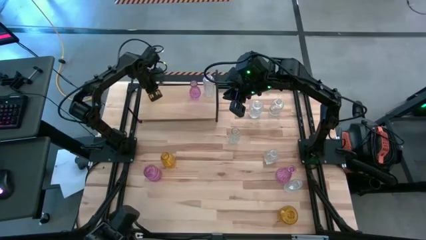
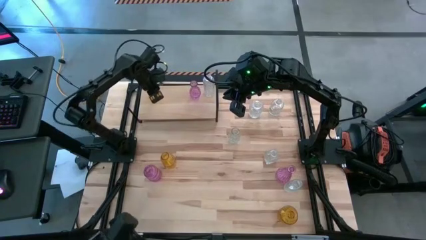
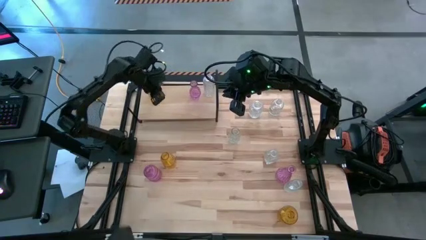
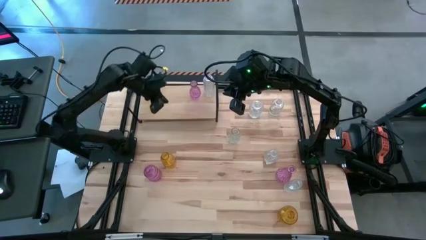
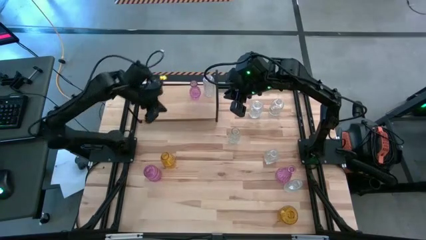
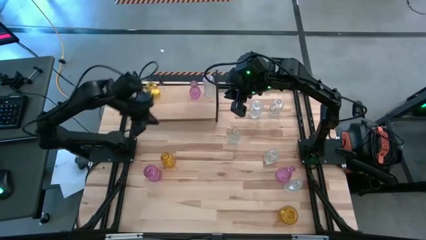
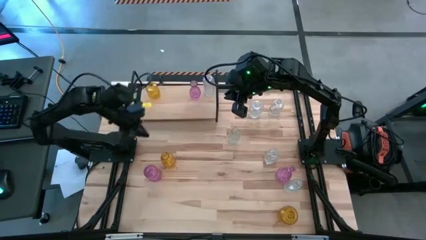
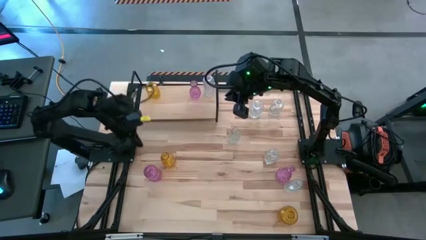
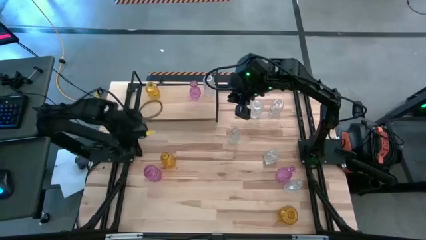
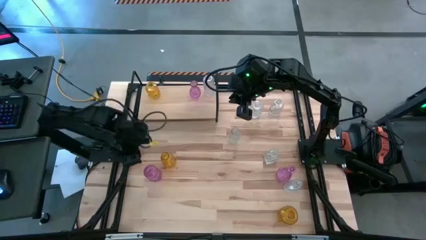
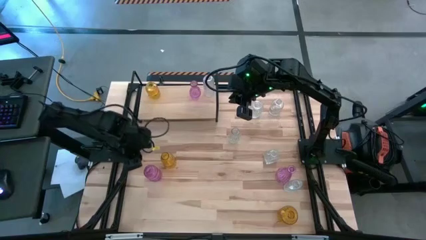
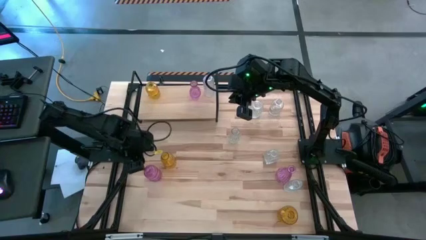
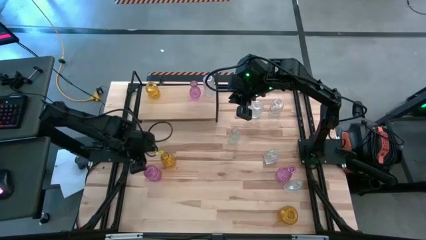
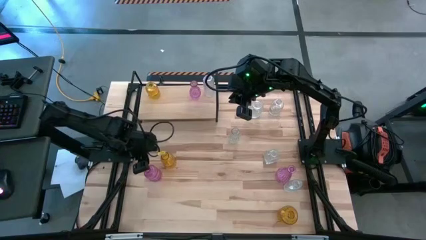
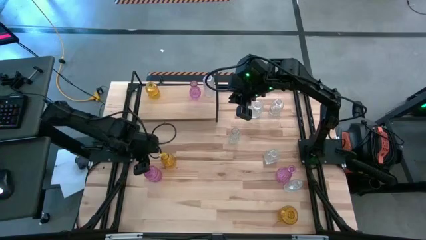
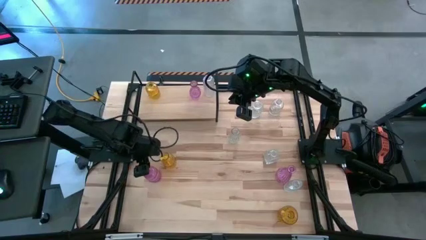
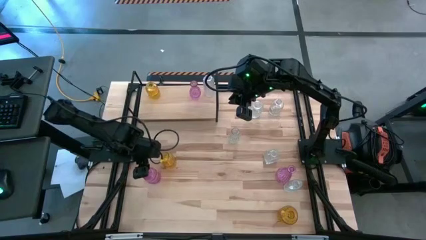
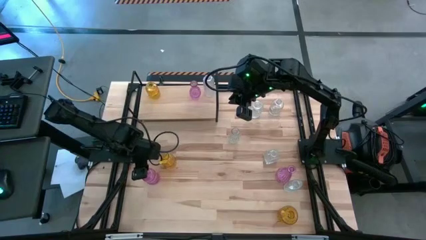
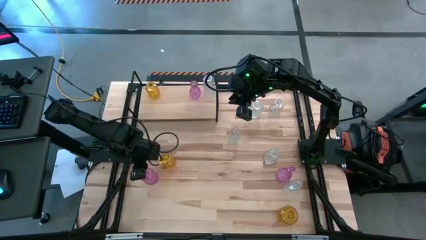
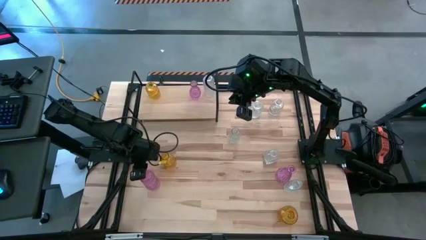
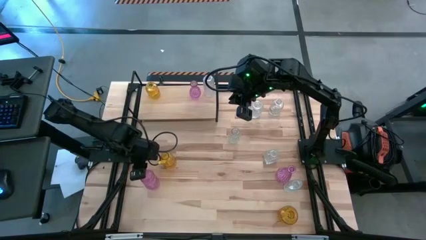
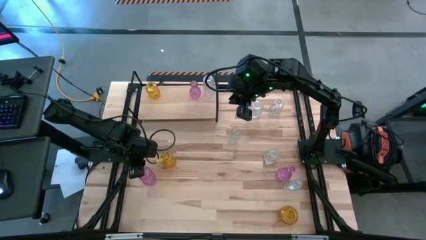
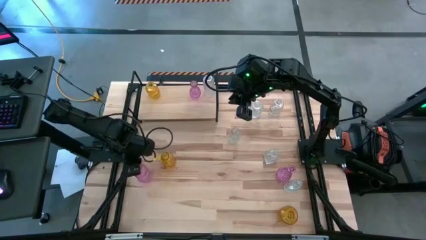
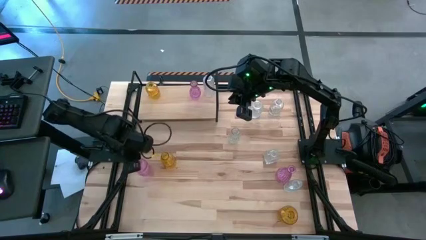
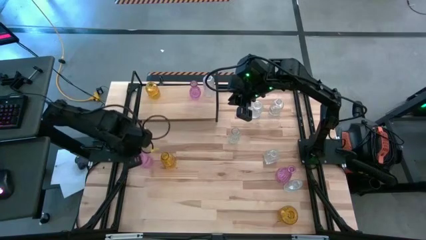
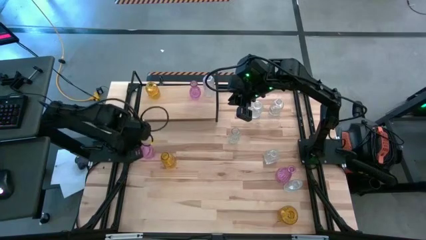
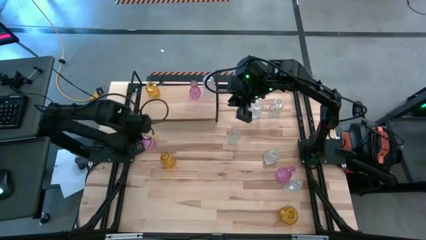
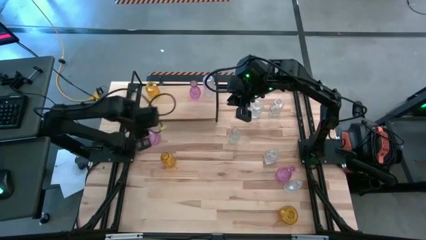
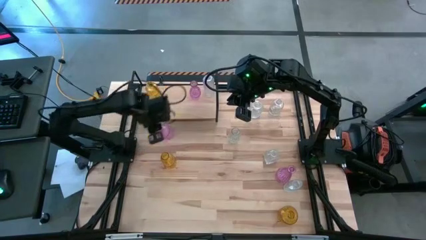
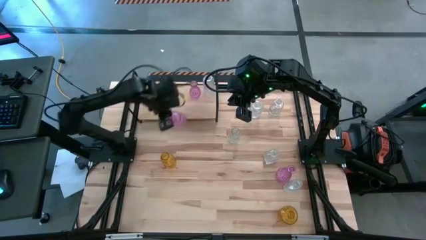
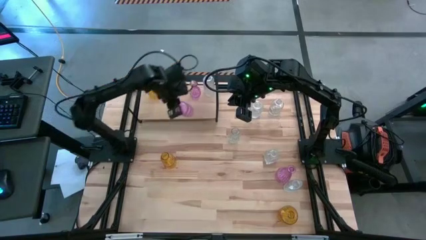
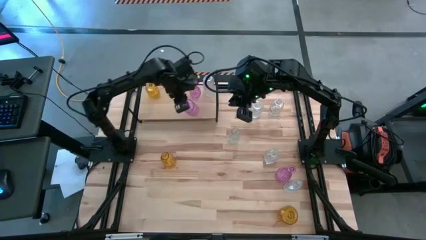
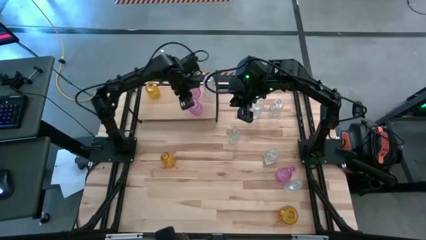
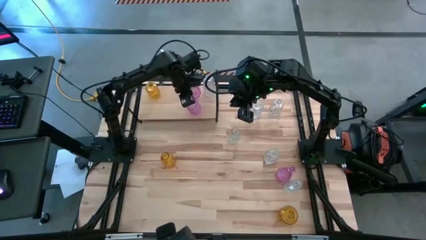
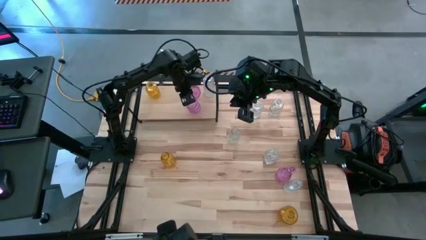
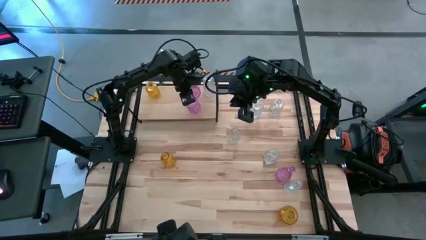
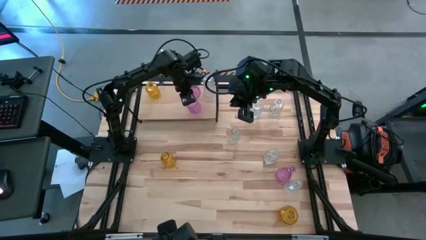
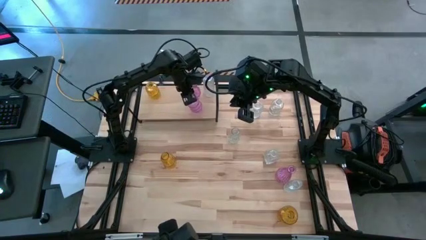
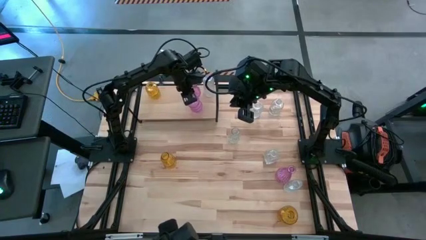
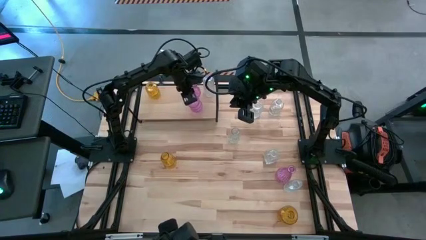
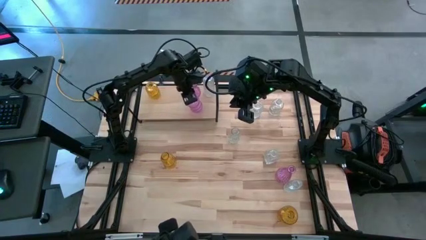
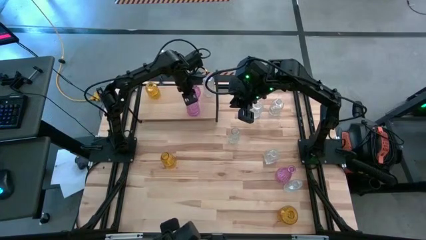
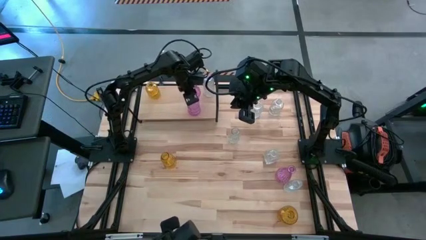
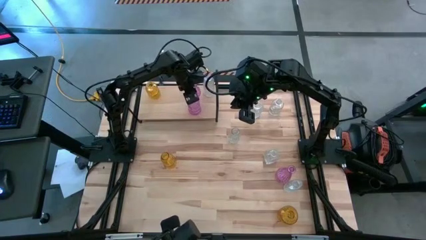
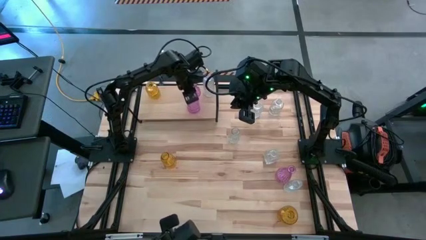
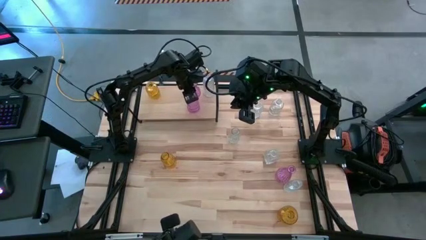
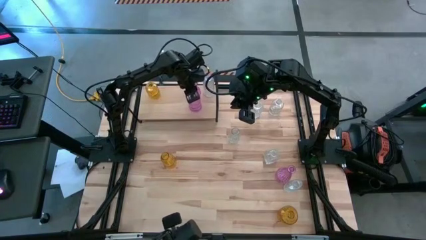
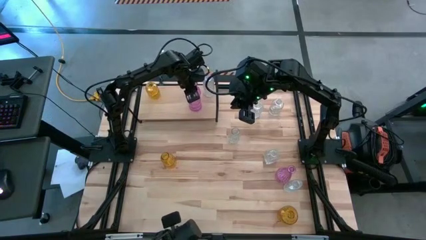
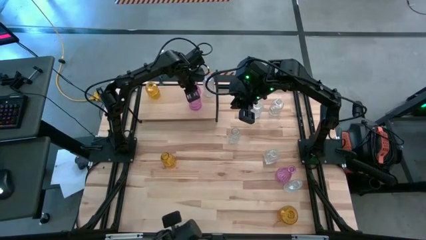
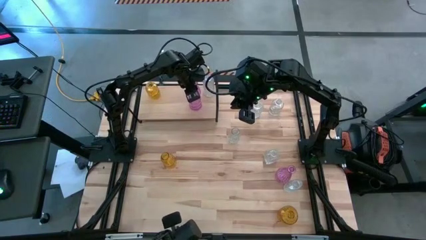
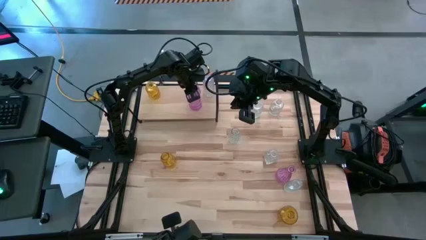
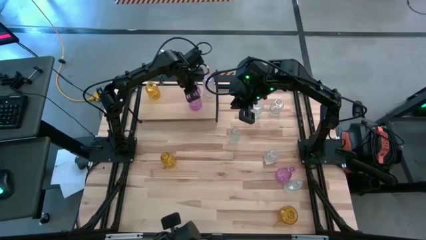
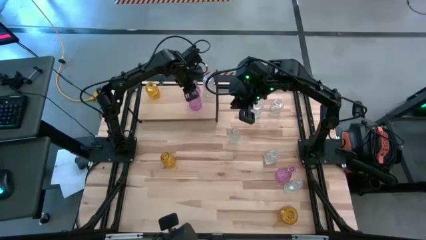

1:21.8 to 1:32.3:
Task: sort vases onto shelf
Put the pink vase on the shelf aligned with the other pink vase

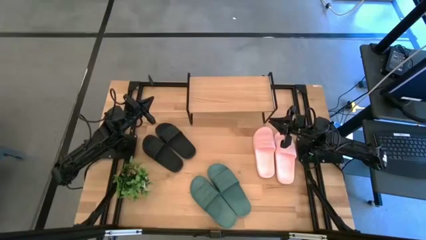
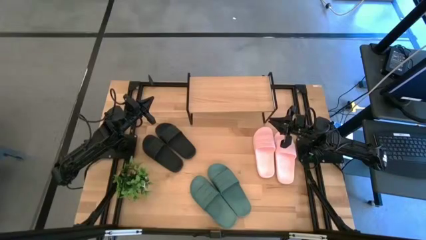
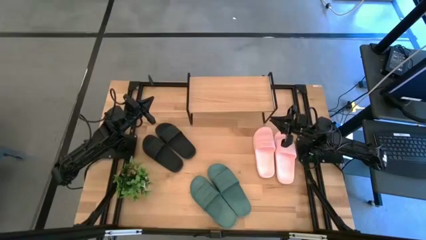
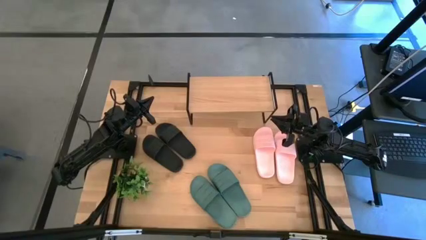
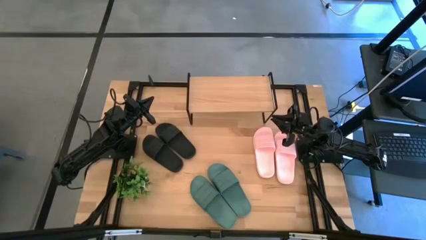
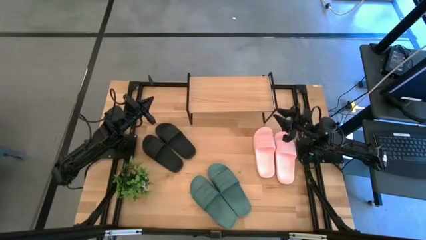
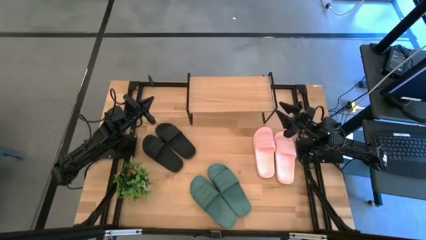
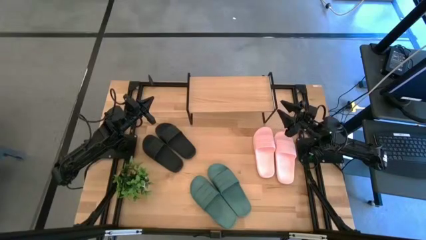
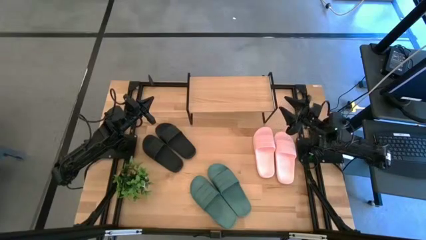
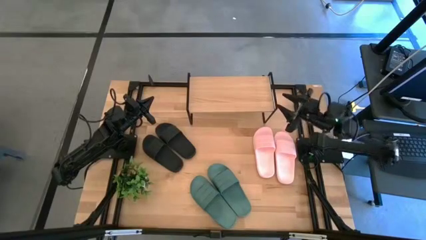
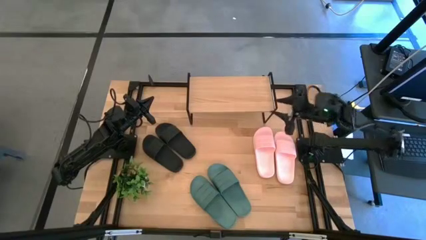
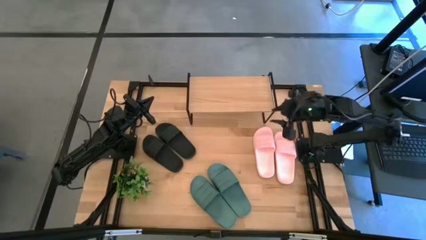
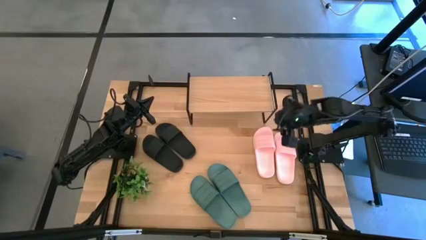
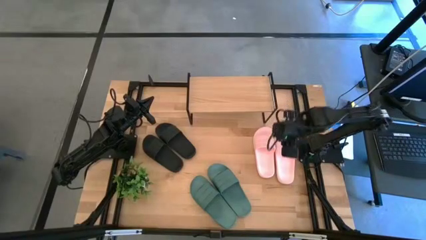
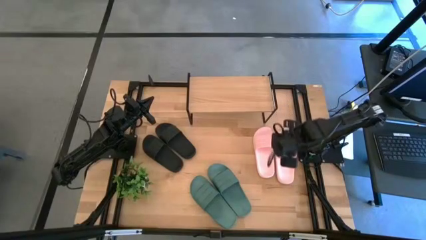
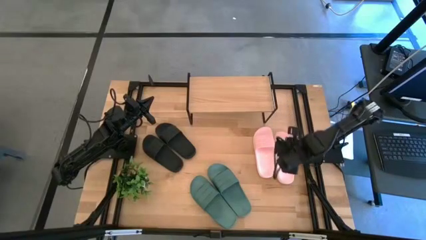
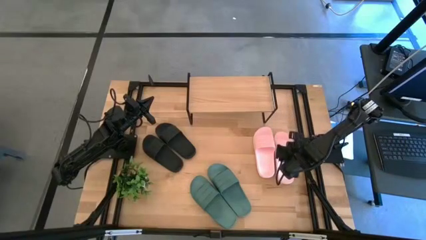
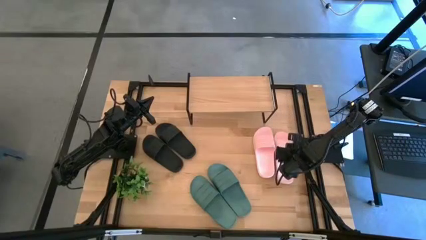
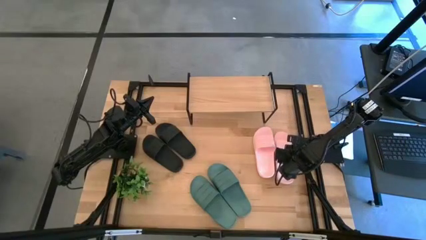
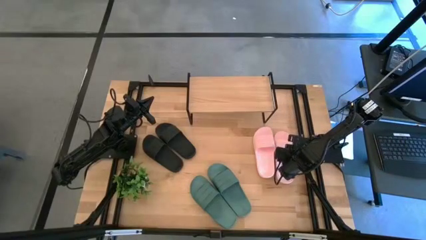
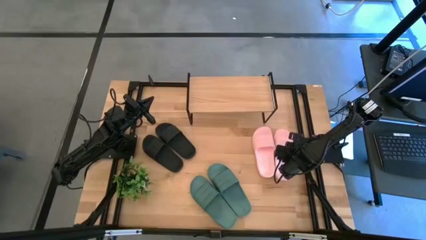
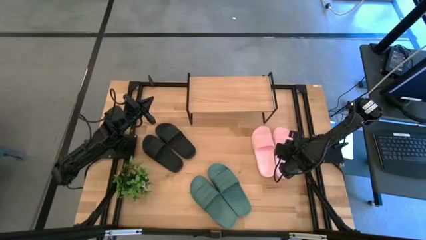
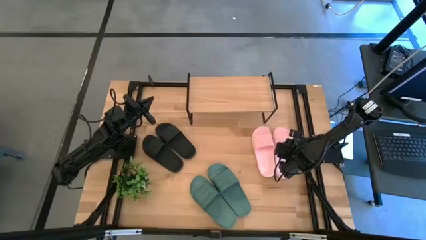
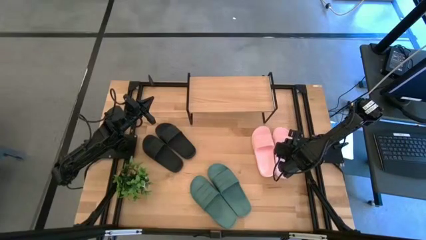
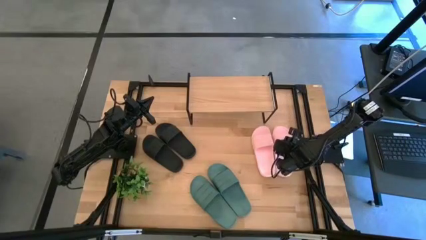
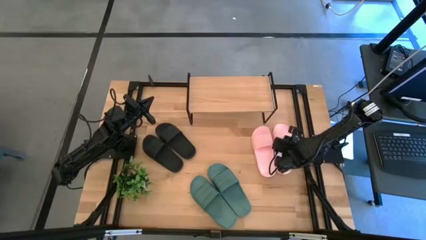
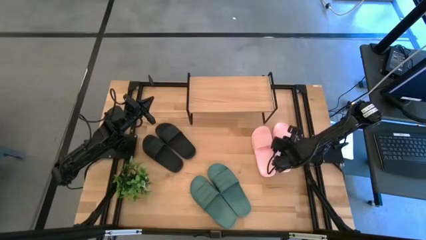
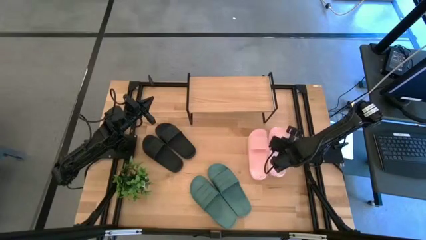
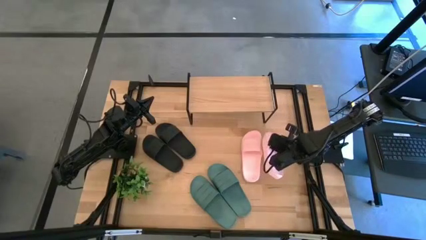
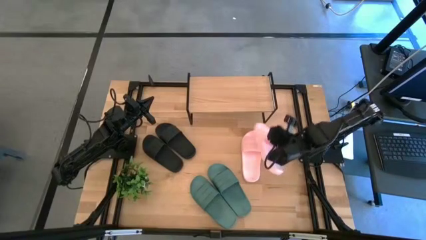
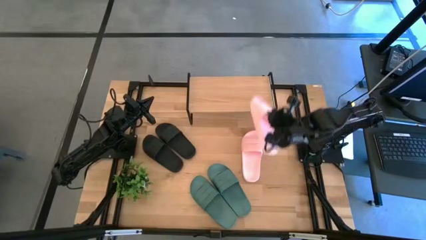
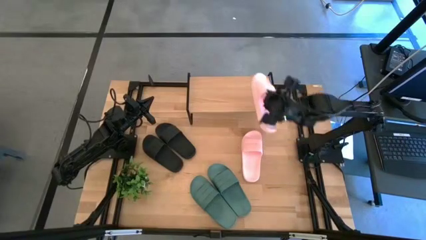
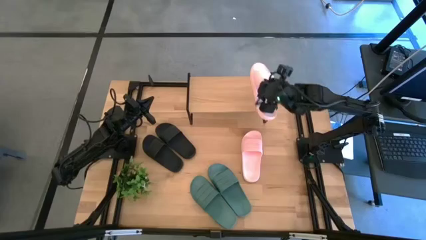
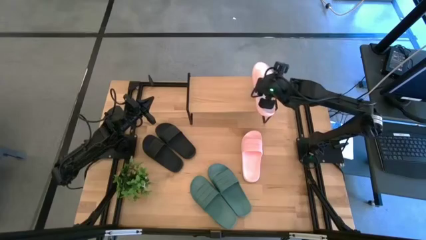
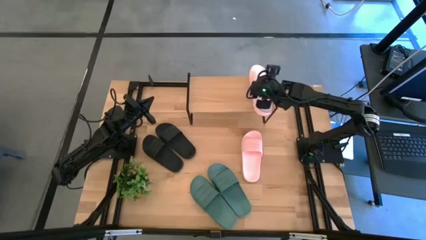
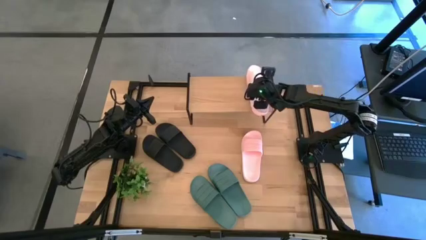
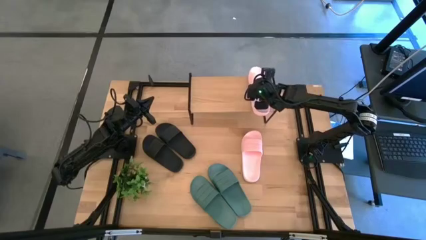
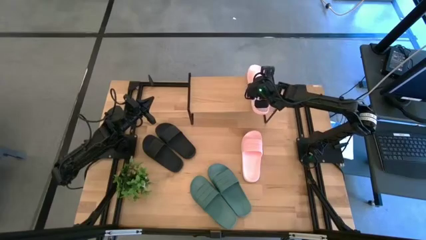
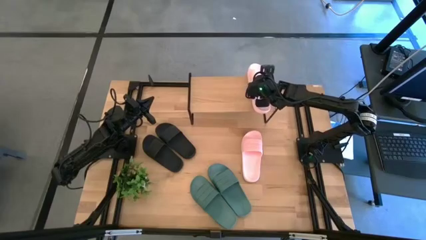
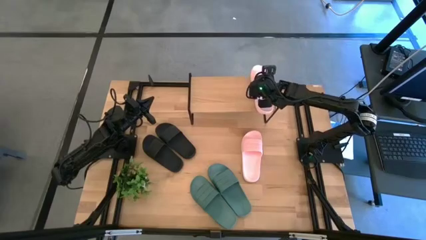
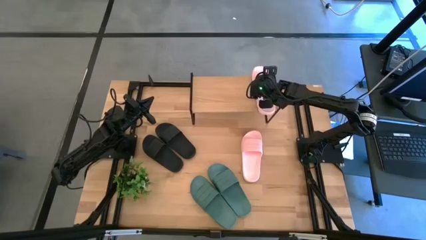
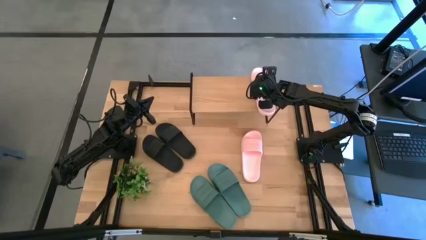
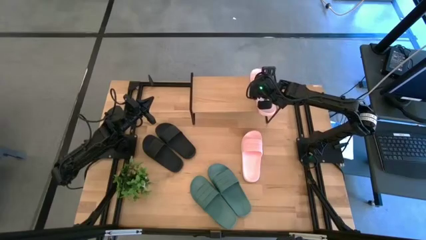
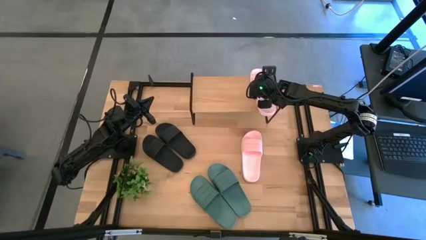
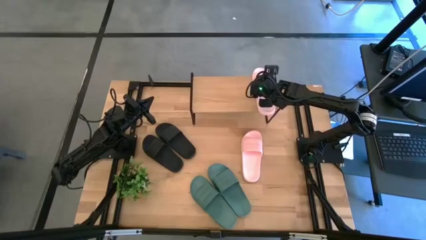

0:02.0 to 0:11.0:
Task: Pick and place slides into the shelf
Put the right pink slide on the shelf
